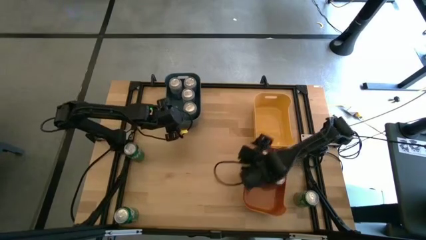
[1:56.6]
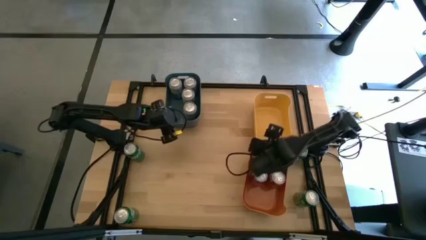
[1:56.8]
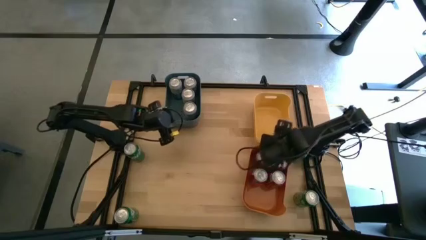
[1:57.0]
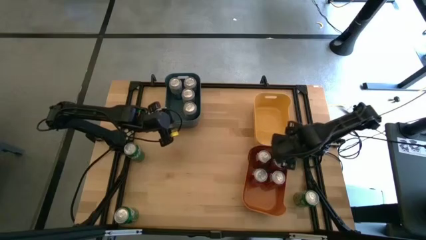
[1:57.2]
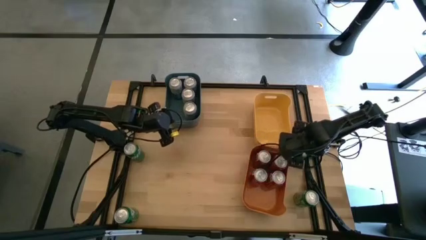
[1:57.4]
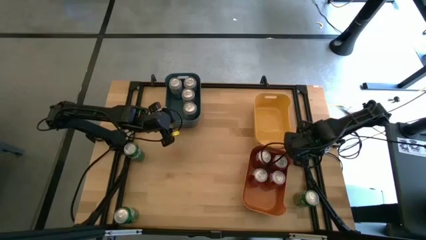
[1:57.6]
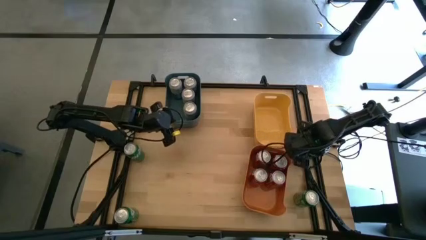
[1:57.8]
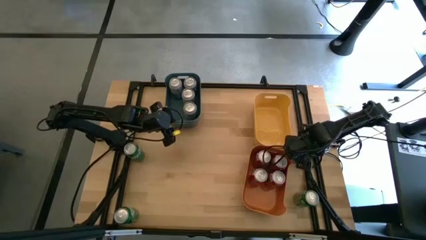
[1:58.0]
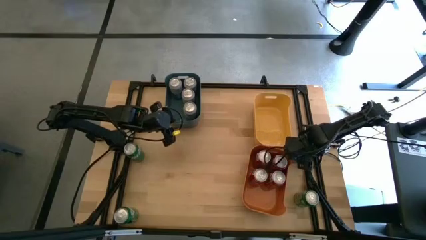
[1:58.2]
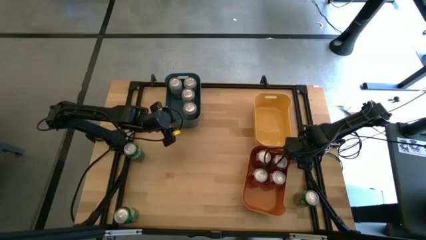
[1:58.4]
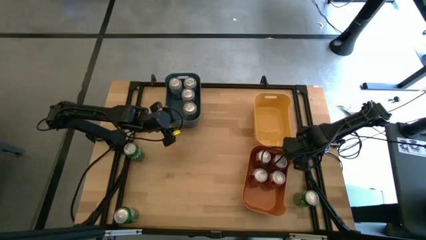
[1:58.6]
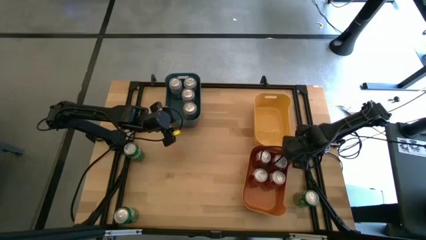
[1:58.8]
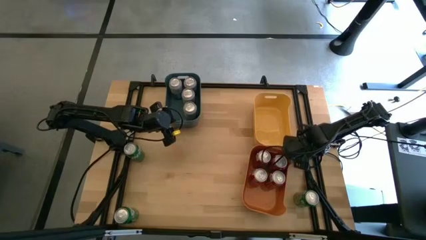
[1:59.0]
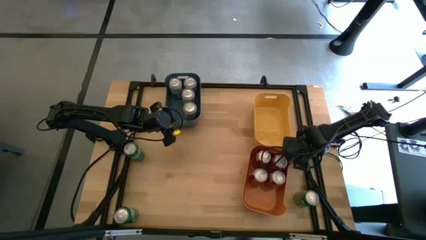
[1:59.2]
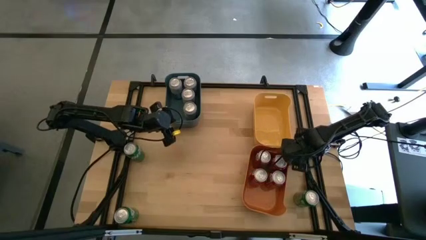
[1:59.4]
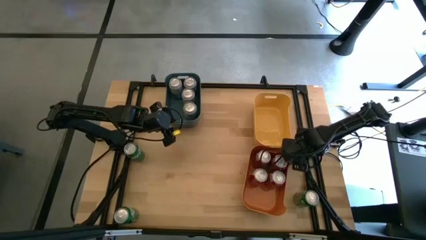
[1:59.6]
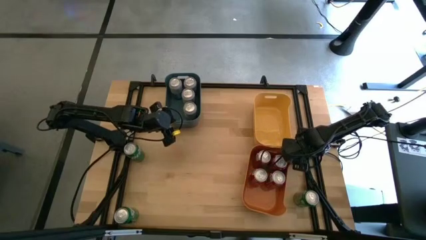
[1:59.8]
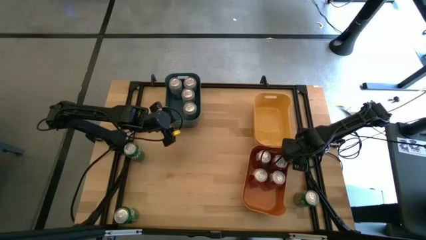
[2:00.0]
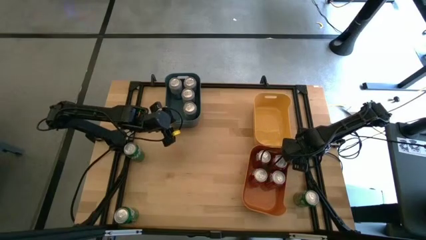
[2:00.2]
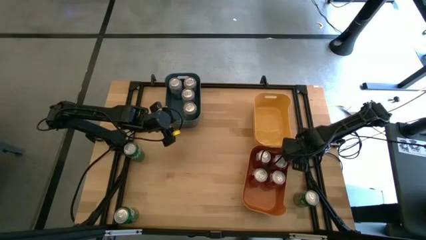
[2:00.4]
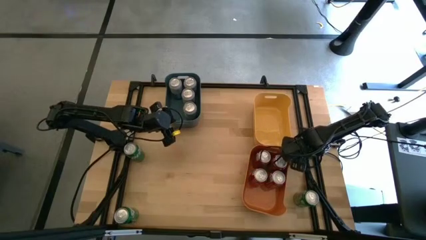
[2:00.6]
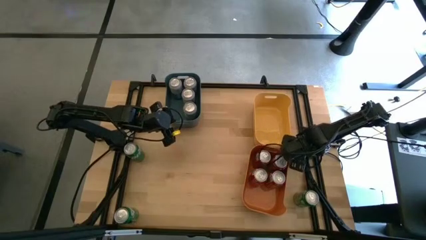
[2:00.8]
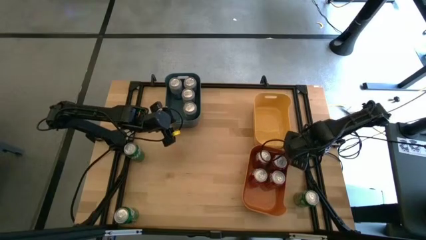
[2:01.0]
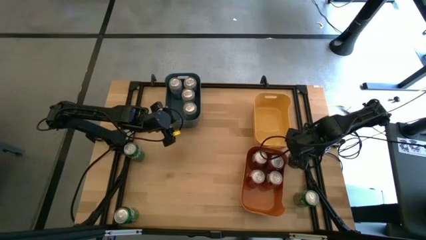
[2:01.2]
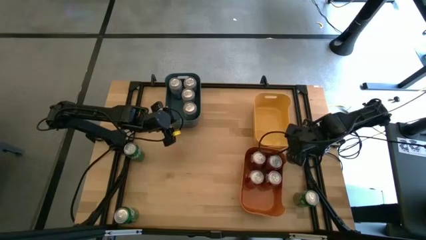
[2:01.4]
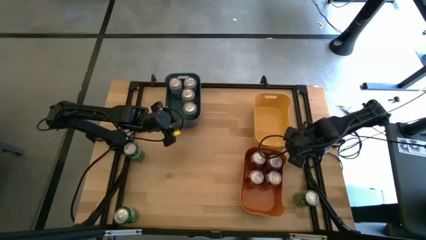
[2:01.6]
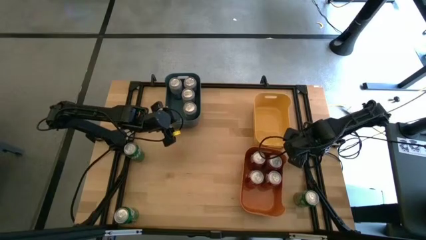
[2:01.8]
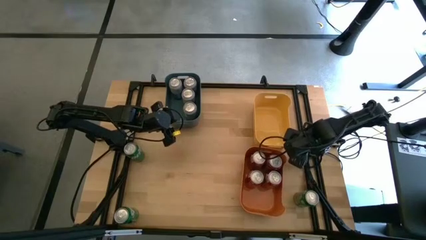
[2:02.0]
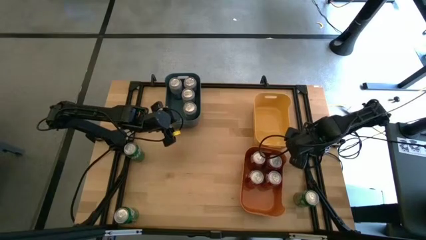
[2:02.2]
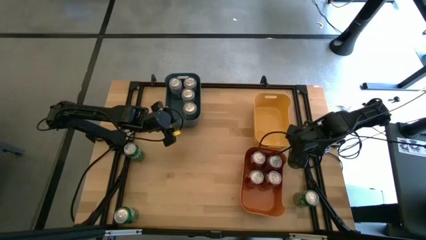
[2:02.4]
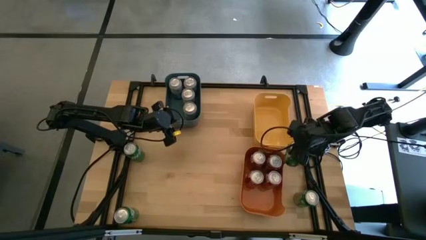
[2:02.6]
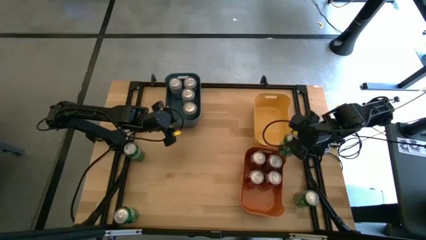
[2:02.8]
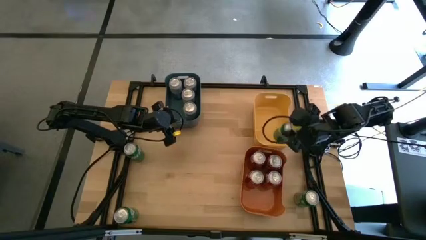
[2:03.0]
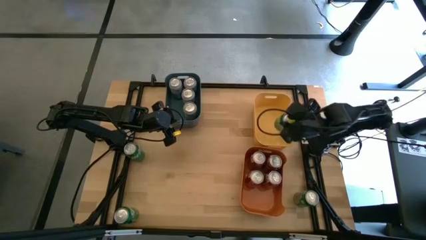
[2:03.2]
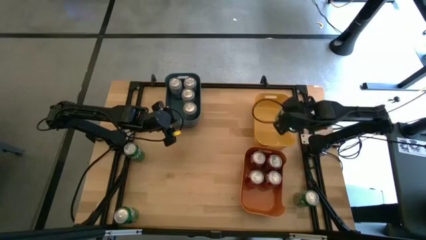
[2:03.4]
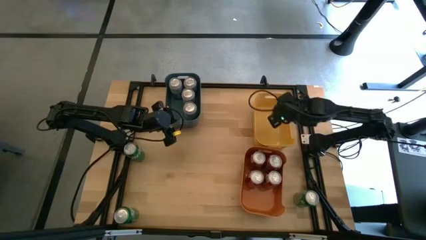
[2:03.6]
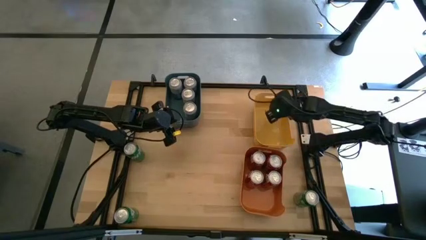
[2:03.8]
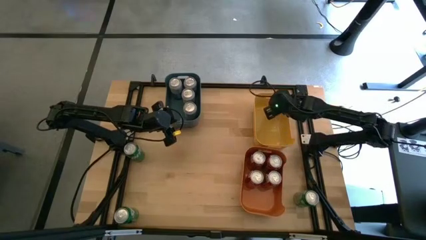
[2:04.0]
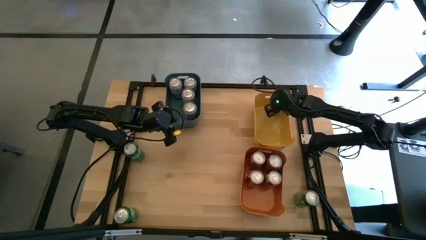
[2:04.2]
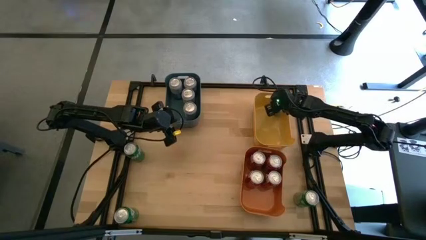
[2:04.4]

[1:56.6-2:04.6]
Task: Sort soda cans
Put the top right green soda can into the yellow bin

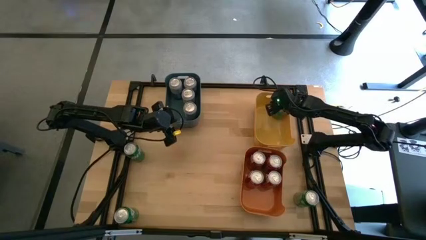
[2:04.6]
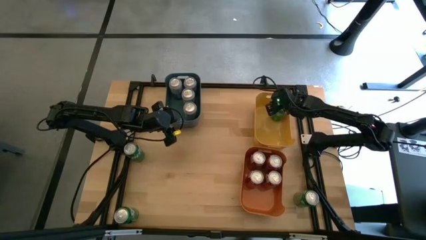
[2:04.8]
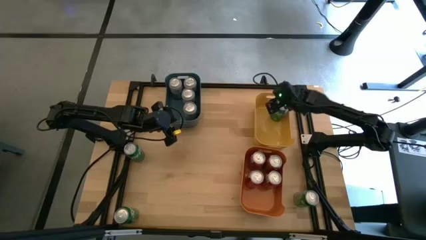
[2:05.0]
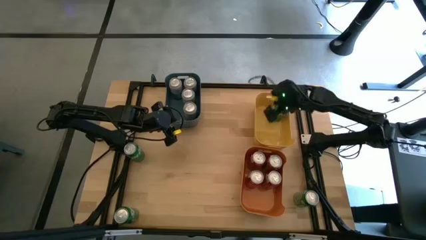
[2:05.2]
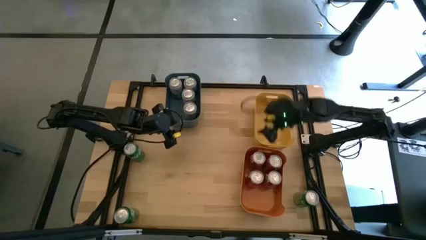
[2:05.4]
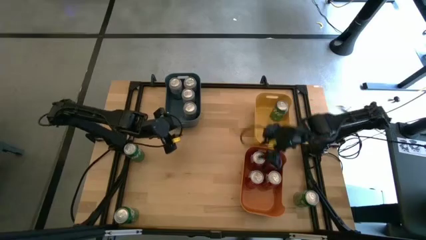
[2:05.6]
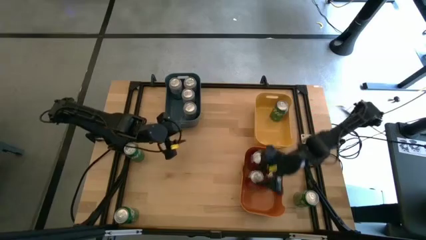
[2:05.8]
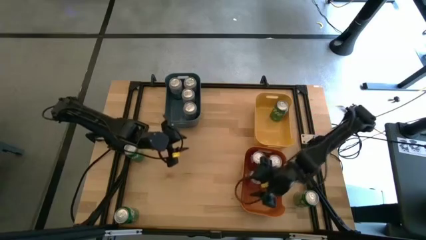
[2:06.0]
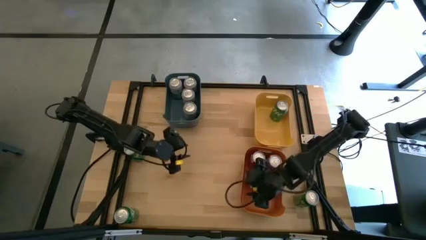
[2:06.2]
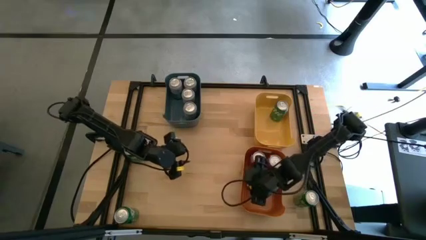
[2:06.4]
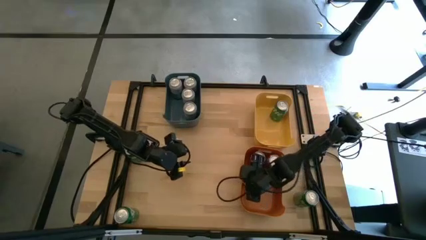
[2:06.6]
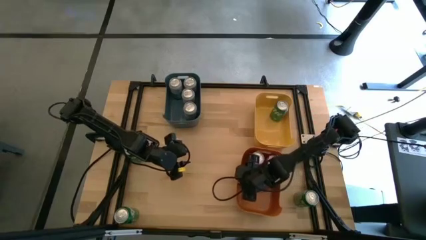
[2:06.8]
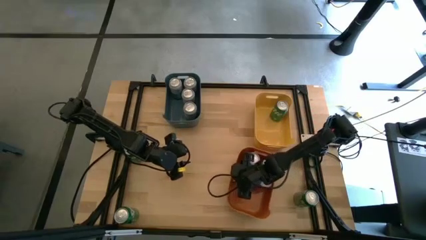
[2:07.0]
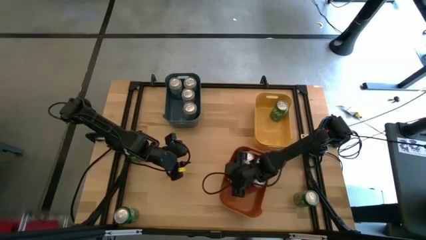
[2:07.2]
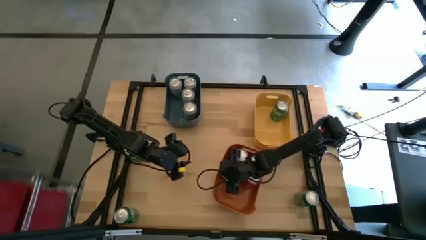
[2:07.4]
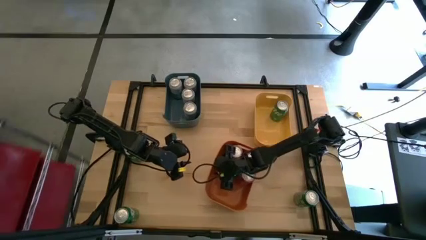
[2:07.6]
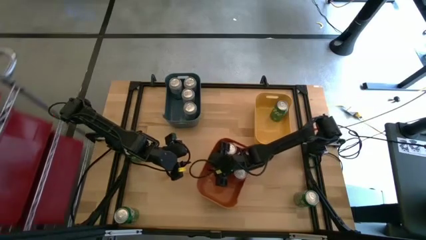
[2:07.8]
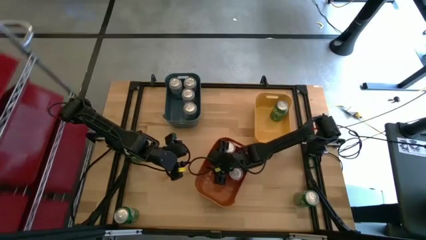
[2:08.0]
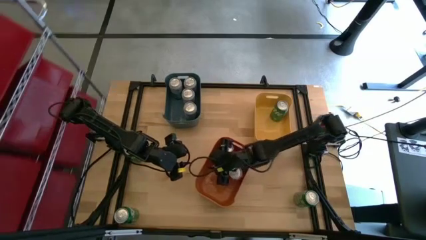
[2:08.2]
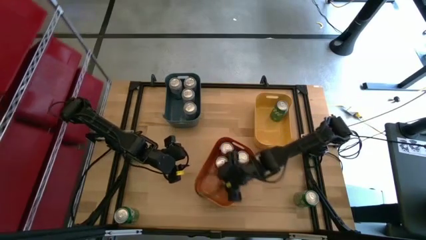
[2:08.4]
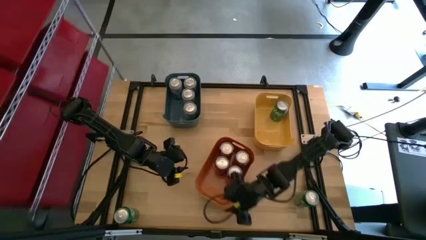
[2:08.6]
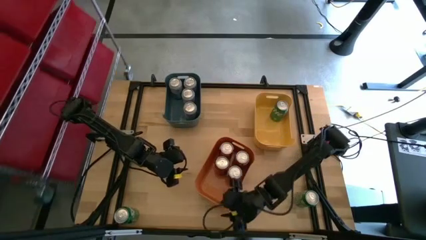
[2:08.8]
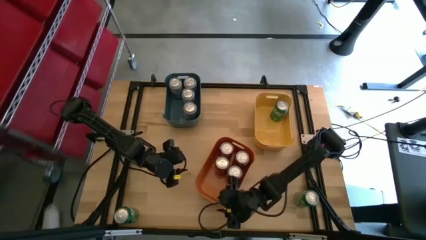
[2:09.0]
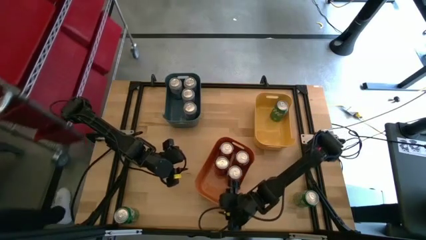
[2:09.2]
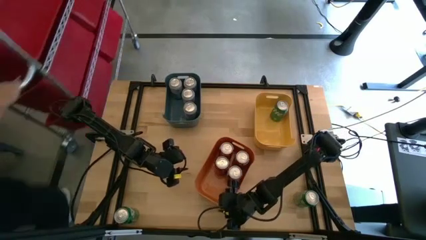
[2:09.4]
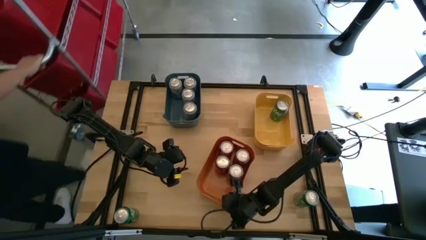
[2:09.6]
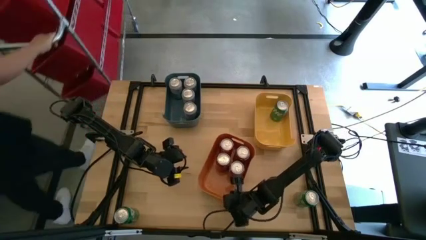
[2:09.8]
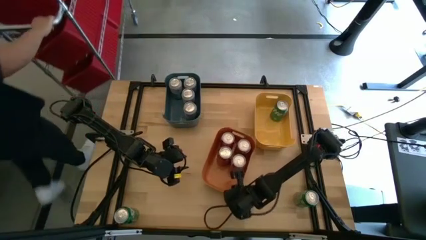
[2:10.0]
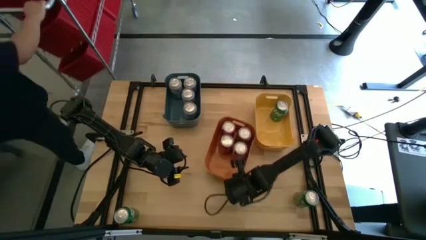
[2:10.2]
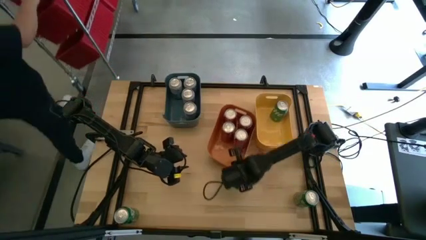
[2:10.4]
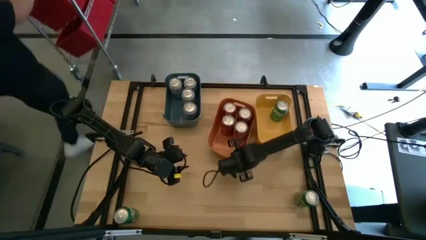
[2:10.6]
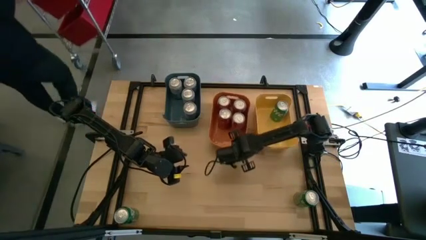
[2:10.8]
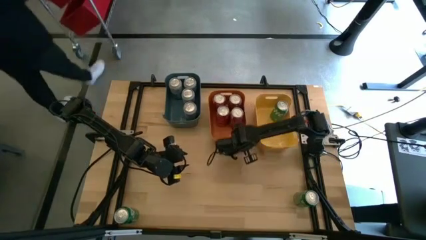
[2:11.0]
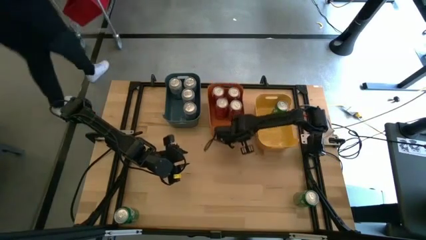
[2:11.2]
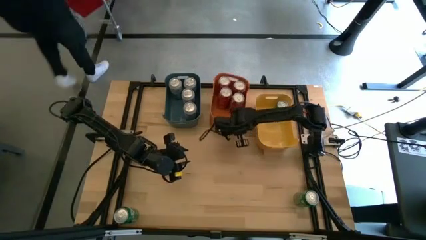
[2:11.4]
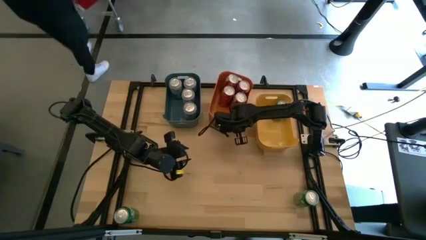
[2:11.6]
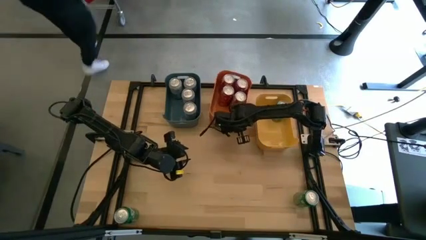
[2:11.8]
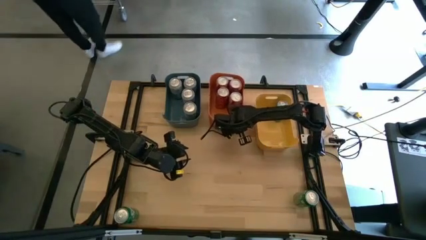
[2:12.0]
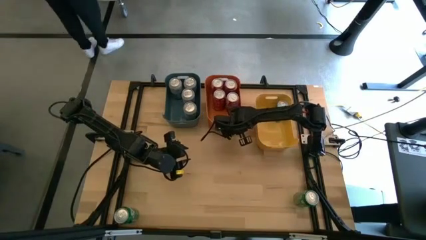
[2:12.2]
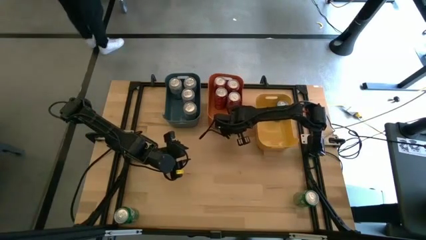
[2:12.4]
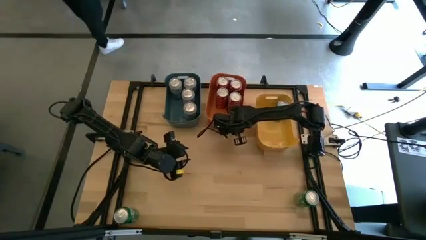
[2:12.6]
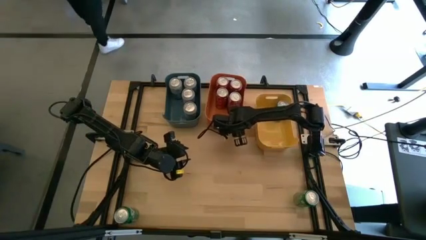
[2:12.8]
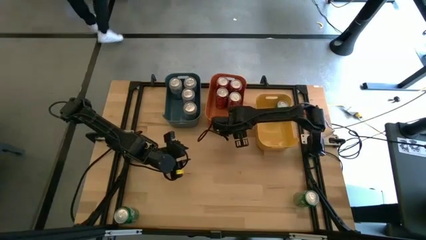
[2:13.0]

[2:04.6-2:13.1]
Move the orange bin to the right of the blue bin
